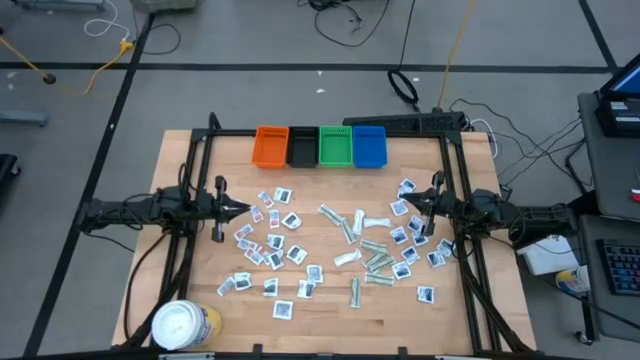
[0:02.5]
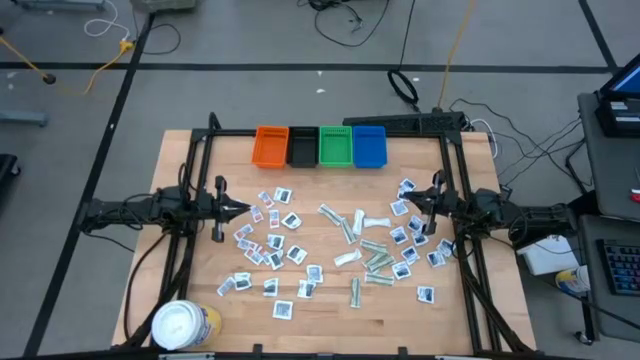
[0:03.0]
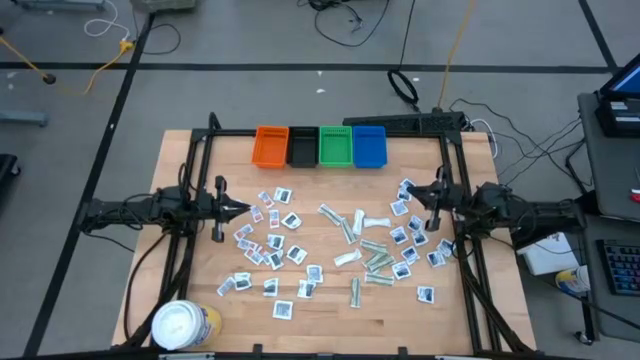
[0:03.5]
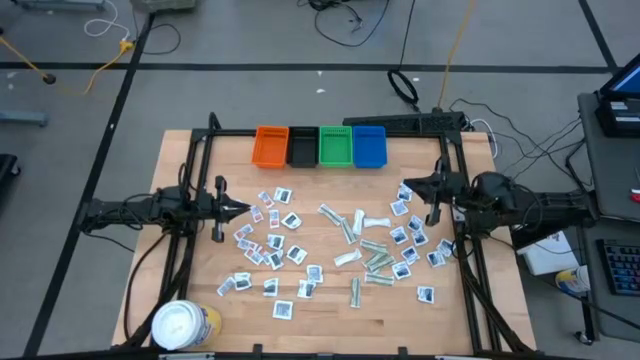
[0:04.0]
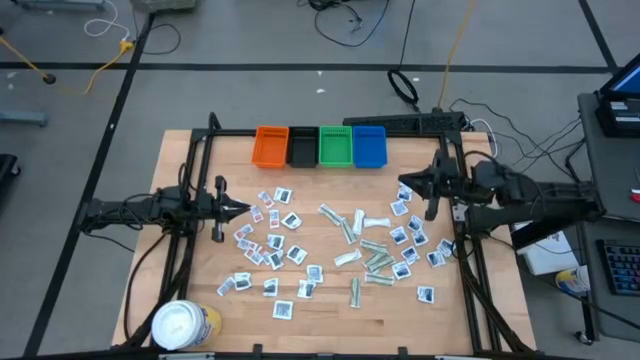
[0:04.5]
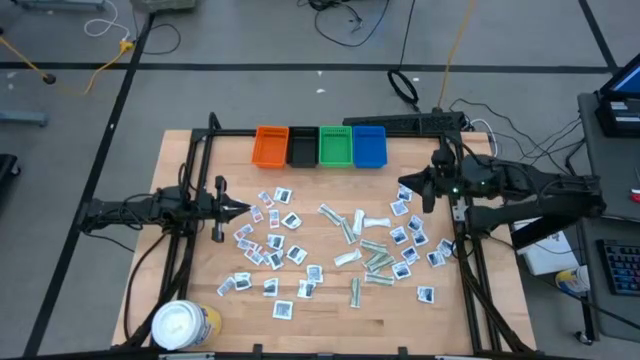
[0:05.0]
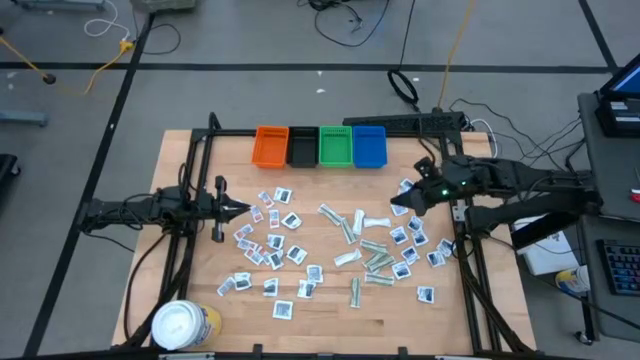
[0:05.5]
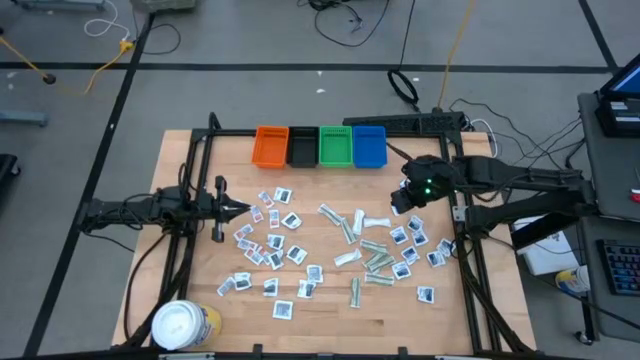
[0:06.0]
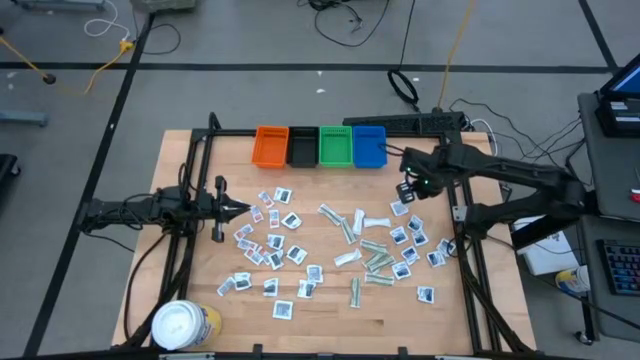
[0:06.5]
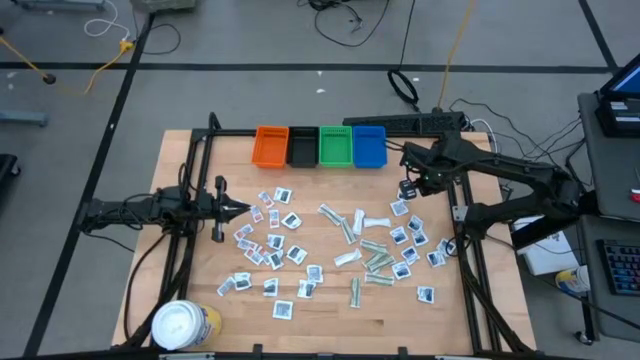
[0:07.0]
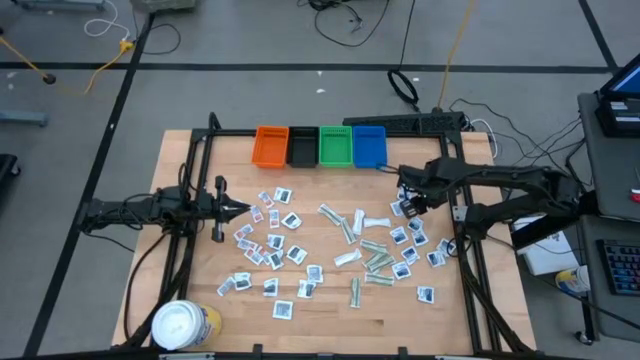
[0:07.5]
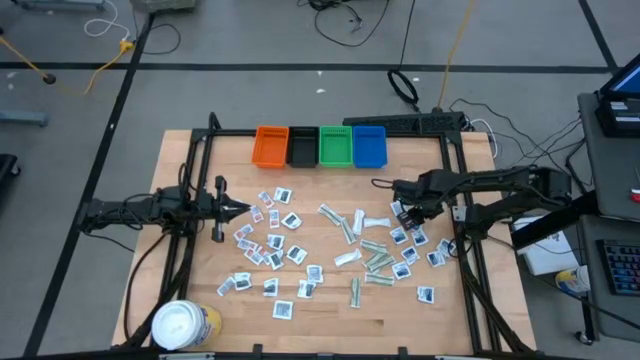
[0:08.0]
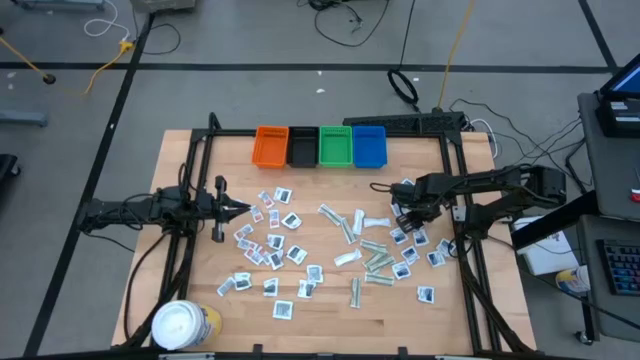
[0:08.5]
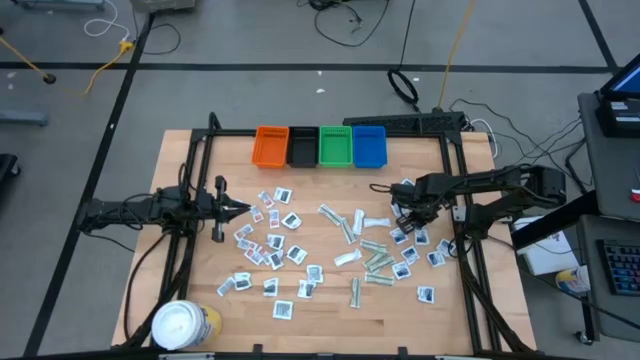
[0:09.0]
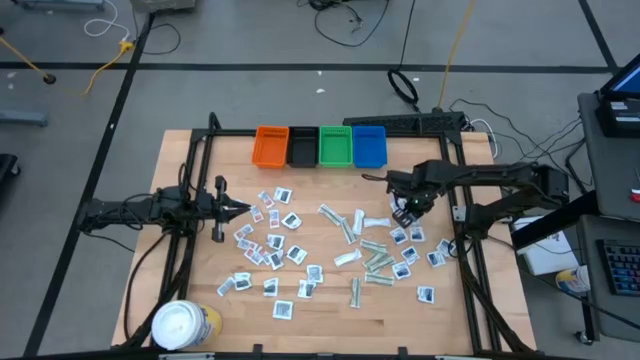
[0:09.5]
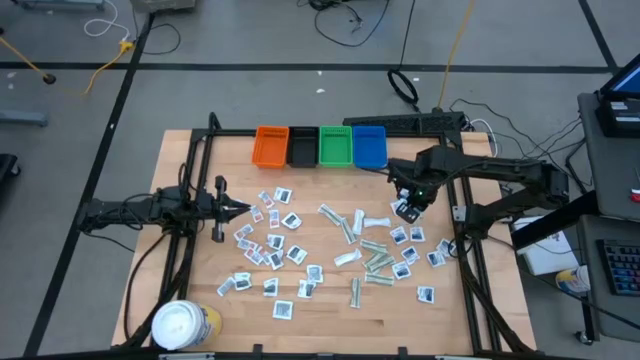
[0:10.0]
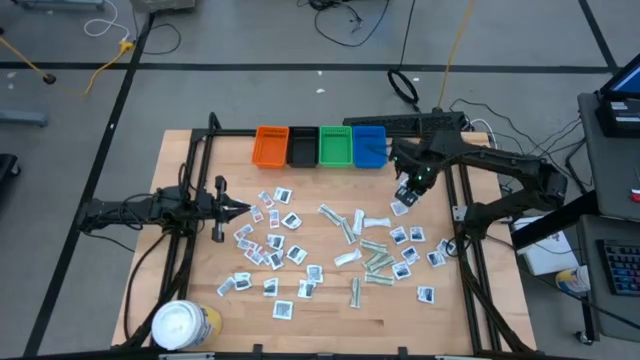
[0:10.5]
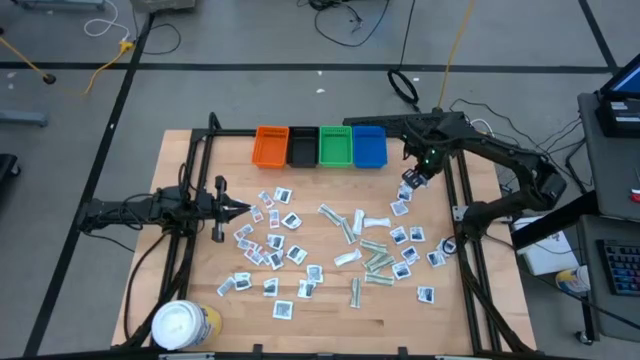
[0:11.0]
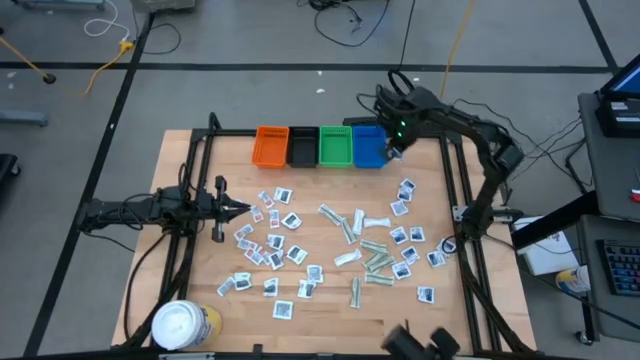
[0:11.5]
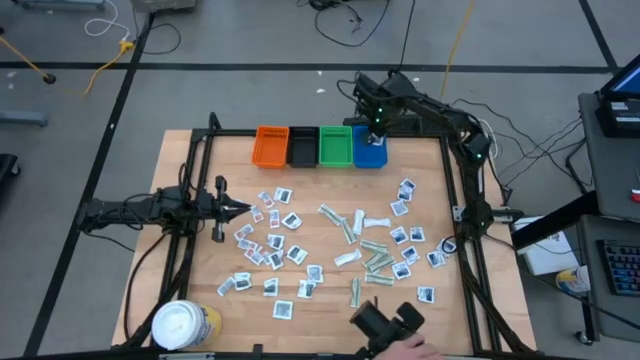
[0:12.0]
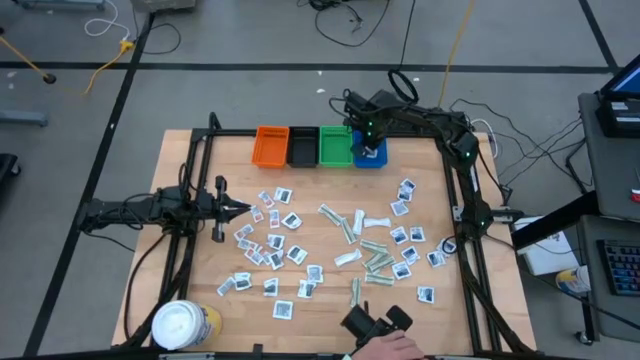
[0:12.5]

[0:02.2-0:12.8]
Task: Pick & Place First Aid Supplies
Put the blue packet into the blue bin

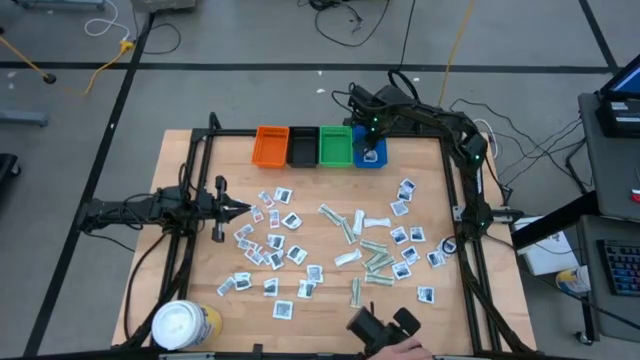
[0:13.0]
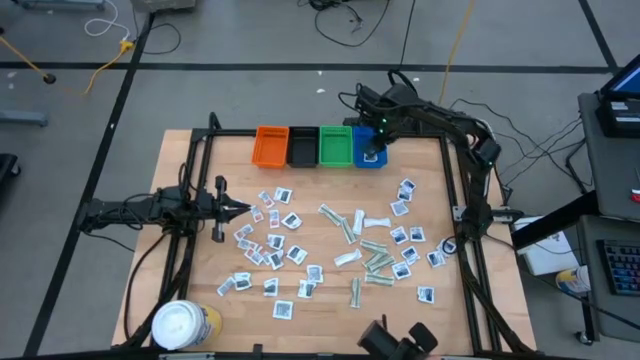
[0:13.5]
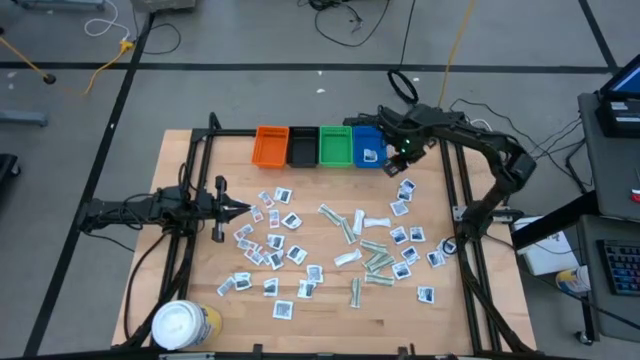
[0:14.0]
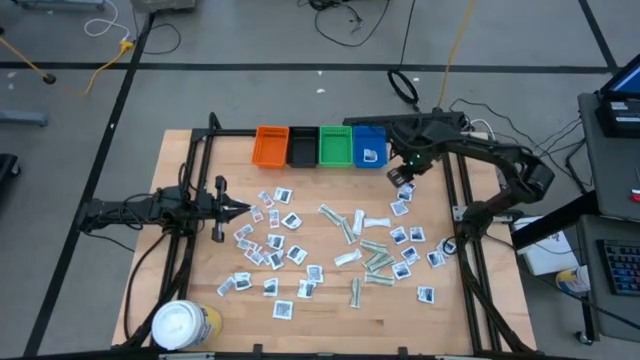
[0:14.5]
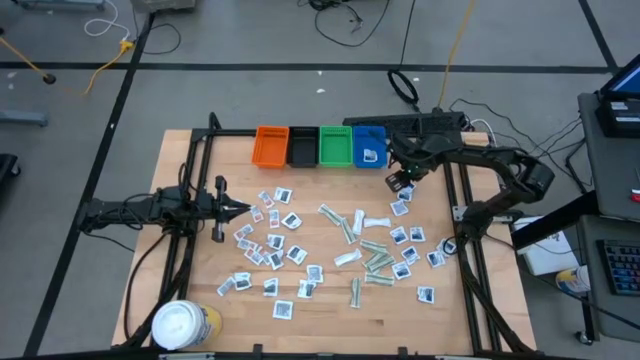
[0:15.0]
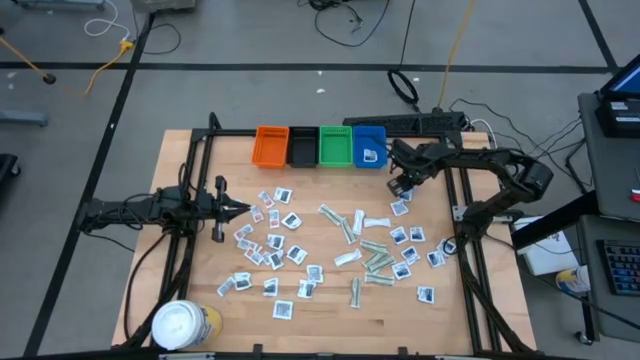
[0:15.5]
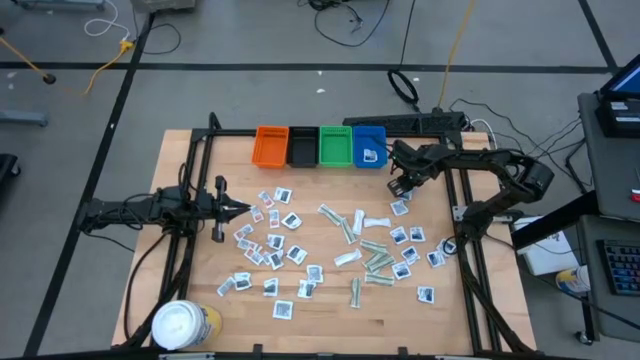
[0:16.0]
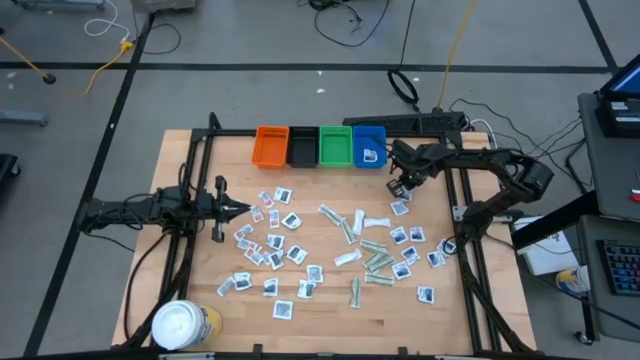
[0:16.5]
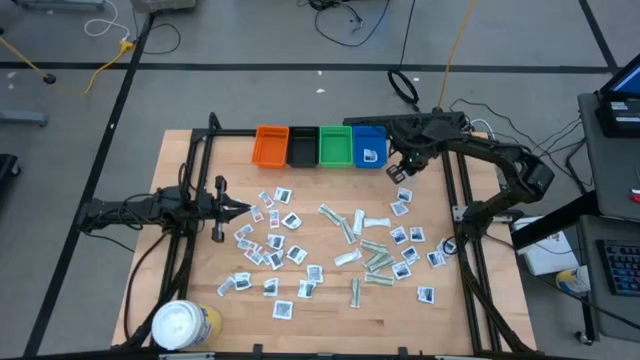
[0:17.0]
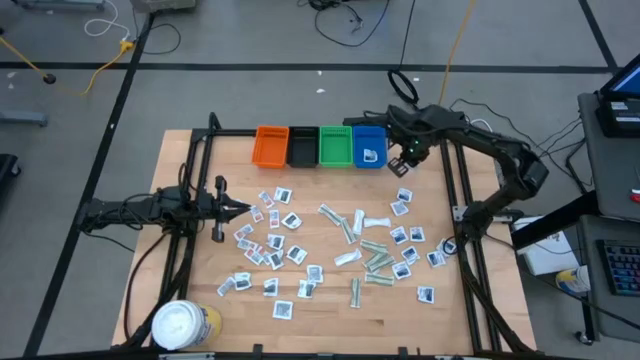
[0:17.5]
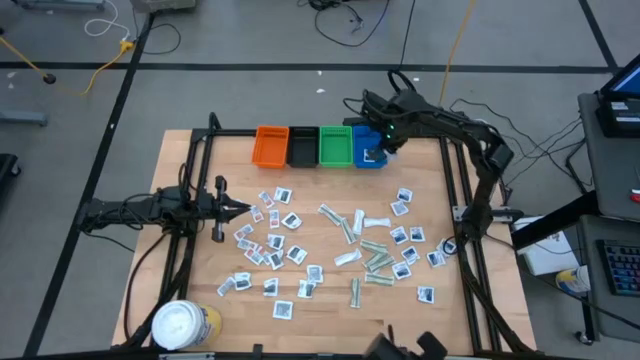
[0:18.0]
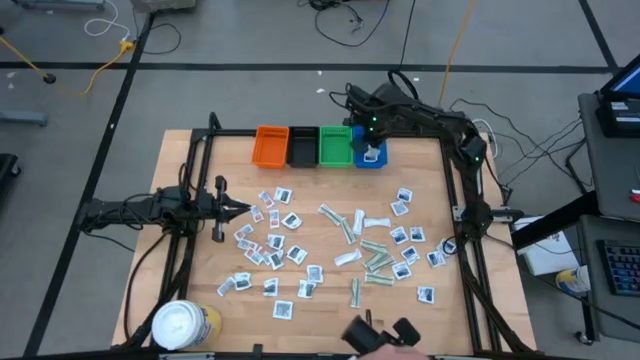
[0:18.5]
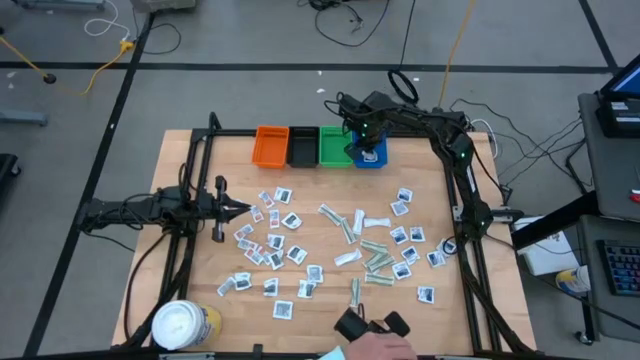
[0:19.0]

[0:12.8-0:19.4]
Put the blue packet into the blue bin

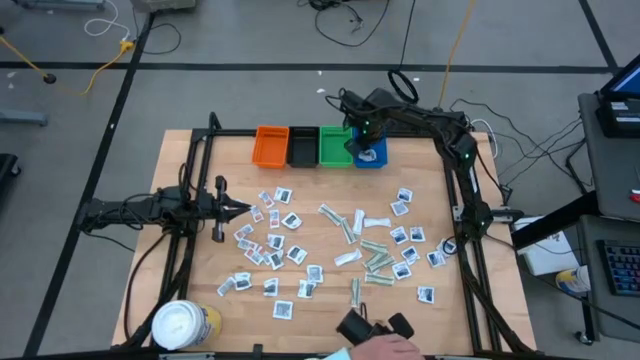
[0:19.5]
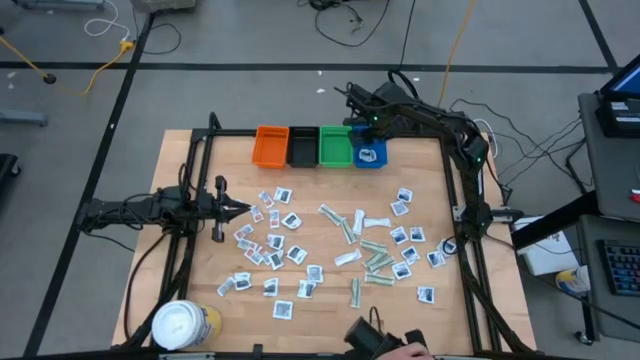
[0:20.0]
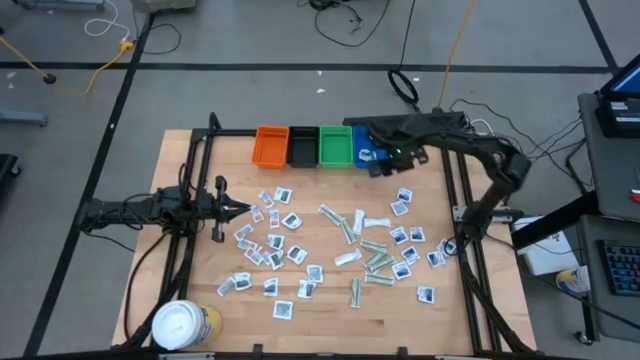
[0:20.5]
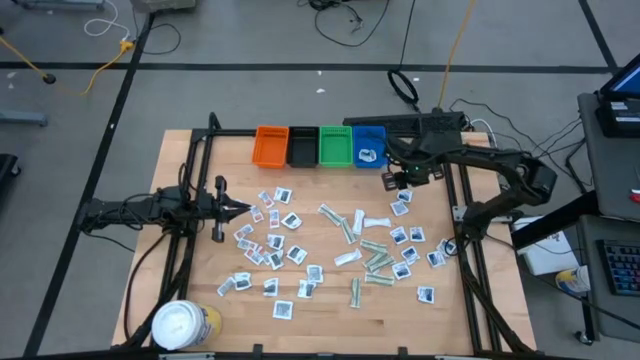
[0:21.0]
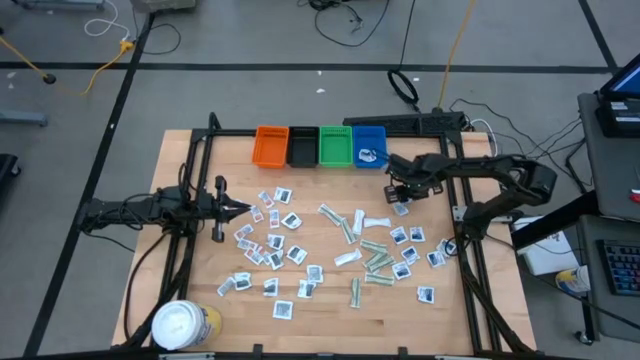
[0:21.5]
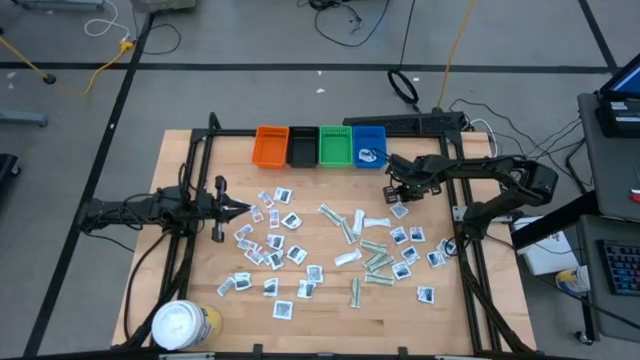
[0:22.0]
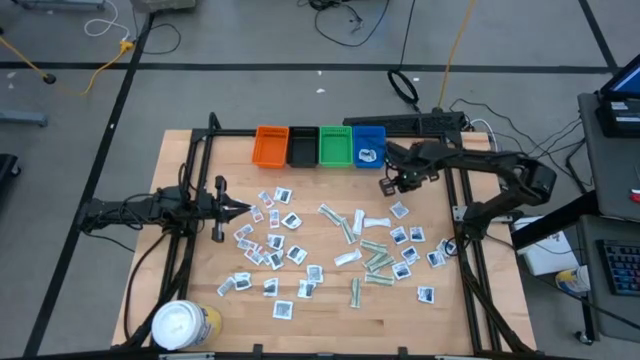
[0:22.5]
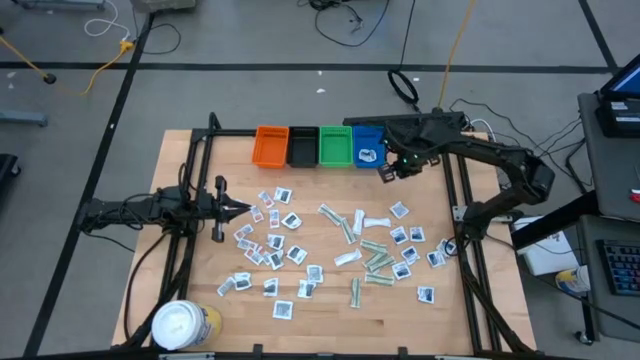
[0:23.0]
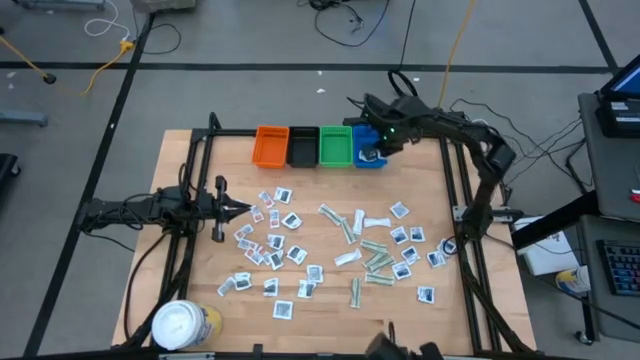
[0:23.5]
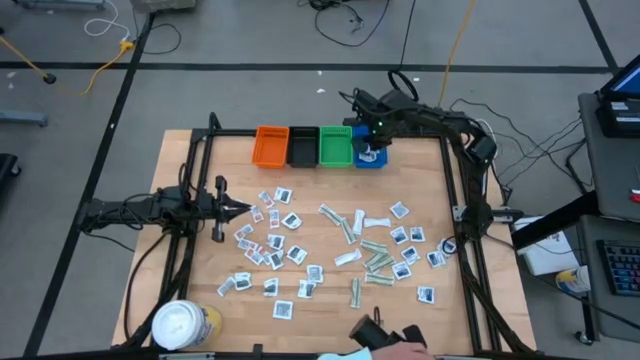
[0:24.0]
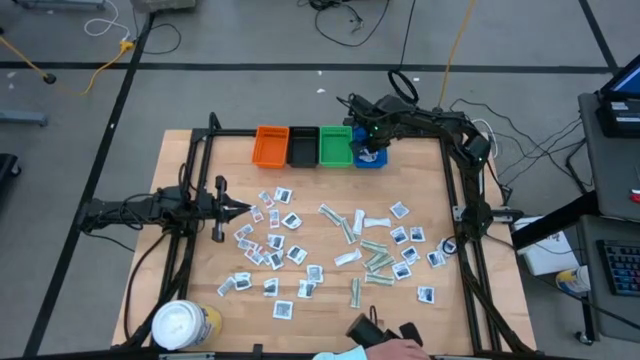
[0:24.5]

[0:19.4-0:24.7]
Put the blue packet into the blue bin
